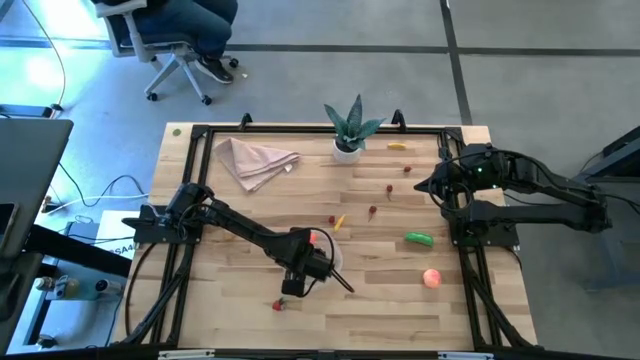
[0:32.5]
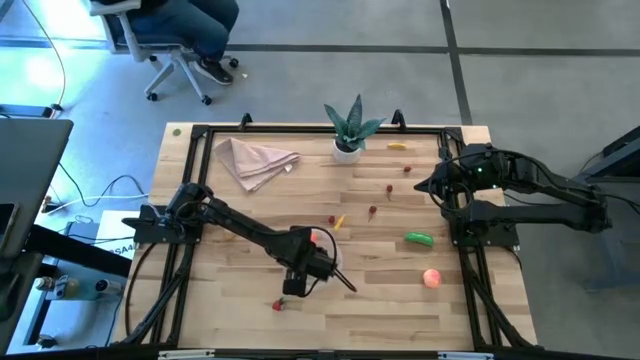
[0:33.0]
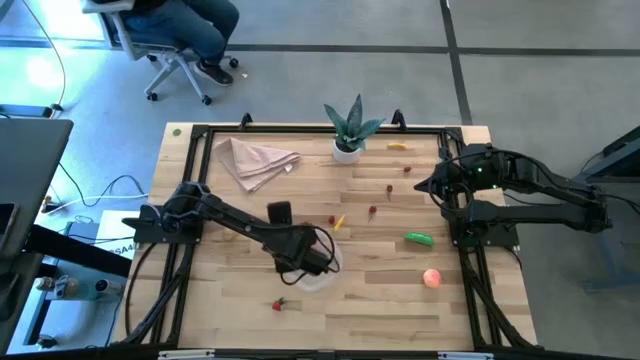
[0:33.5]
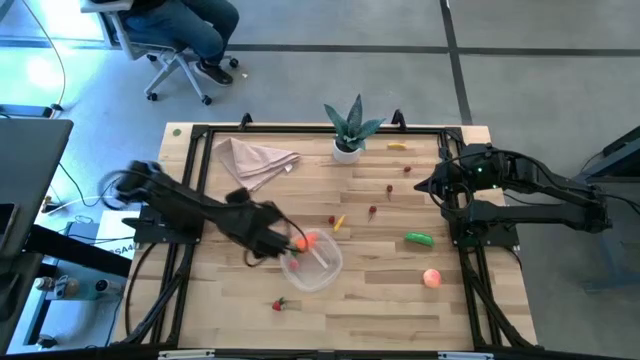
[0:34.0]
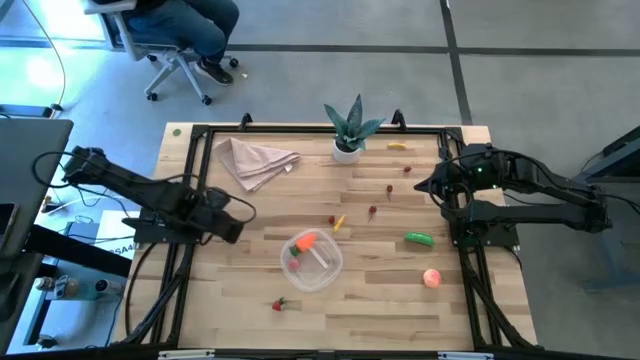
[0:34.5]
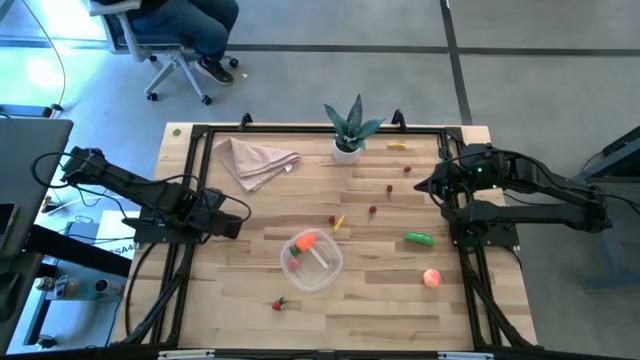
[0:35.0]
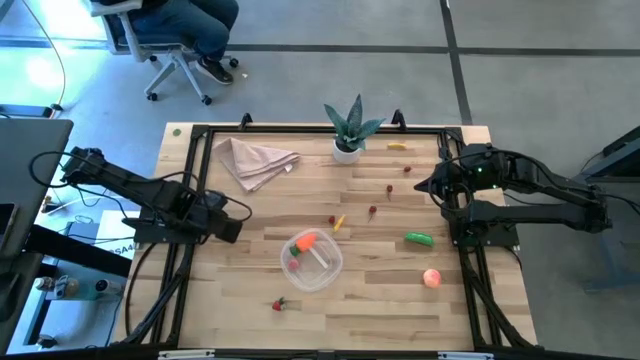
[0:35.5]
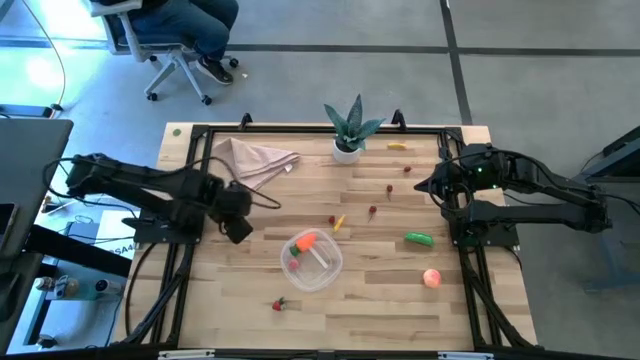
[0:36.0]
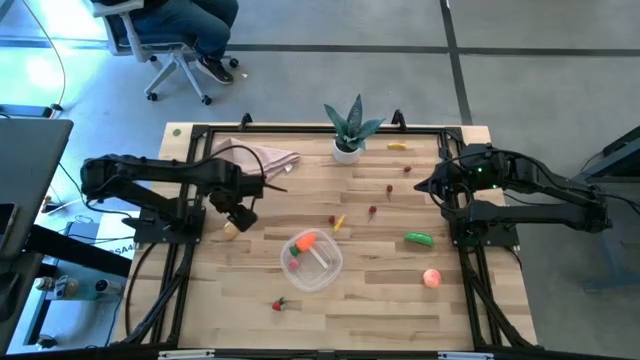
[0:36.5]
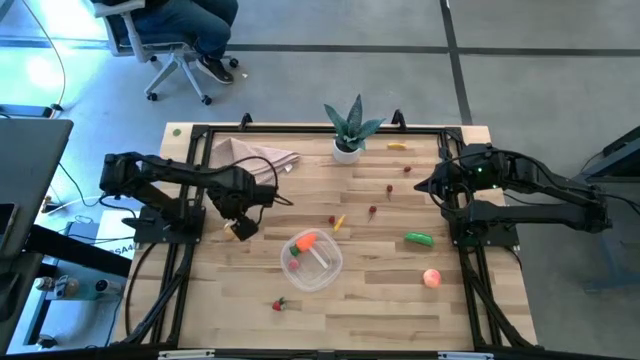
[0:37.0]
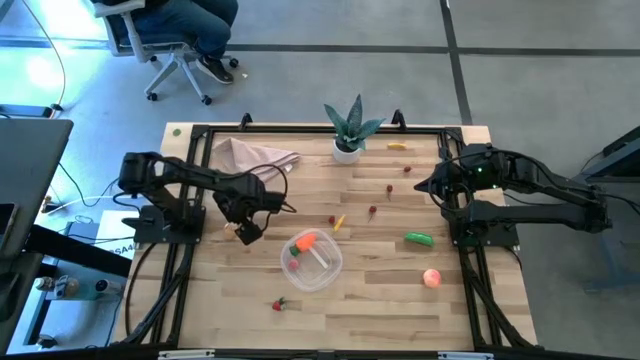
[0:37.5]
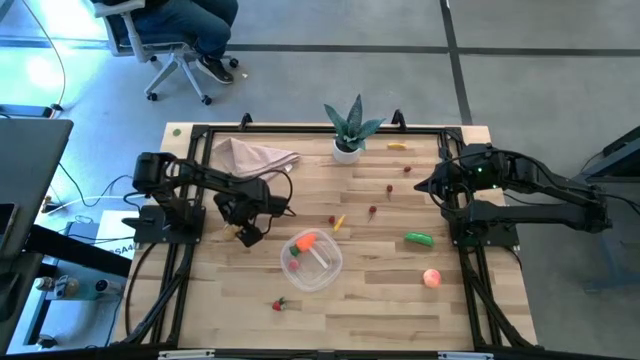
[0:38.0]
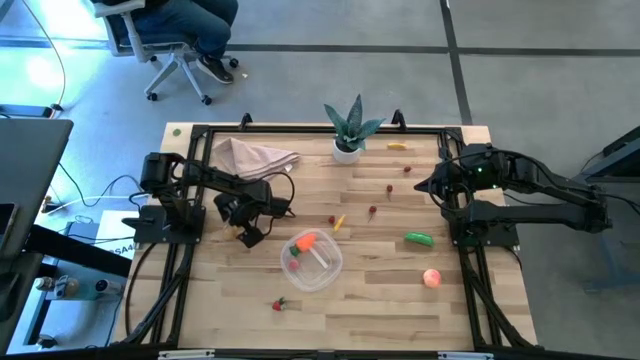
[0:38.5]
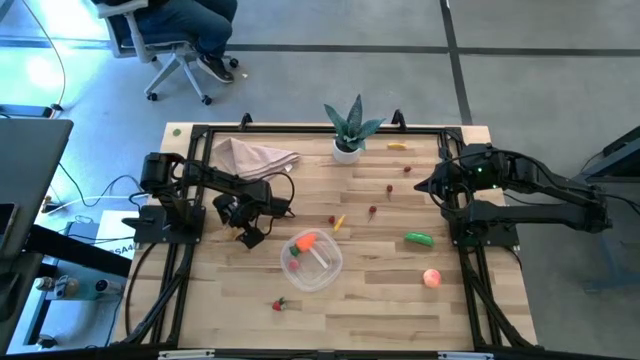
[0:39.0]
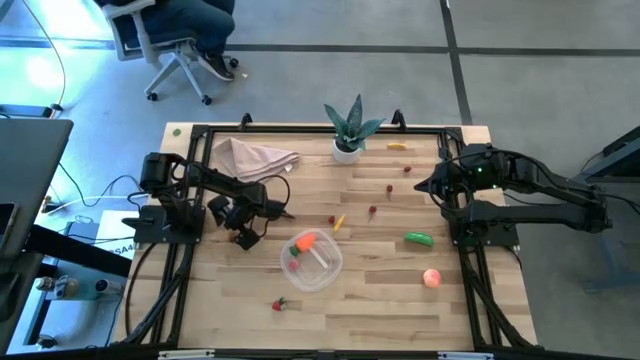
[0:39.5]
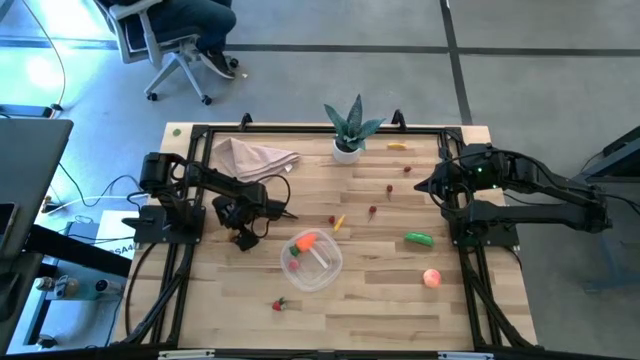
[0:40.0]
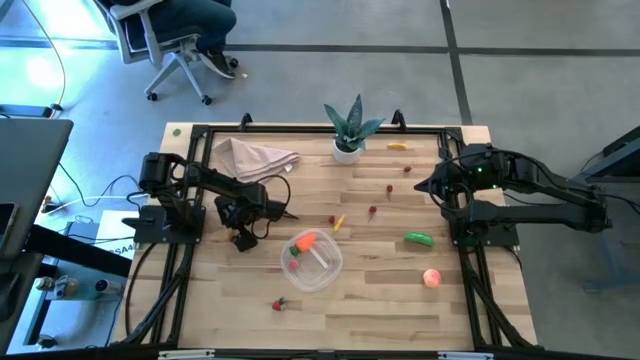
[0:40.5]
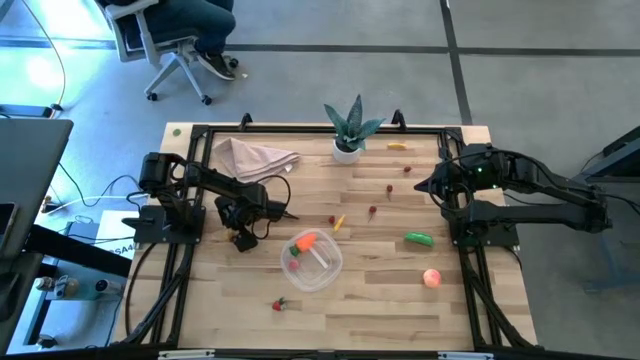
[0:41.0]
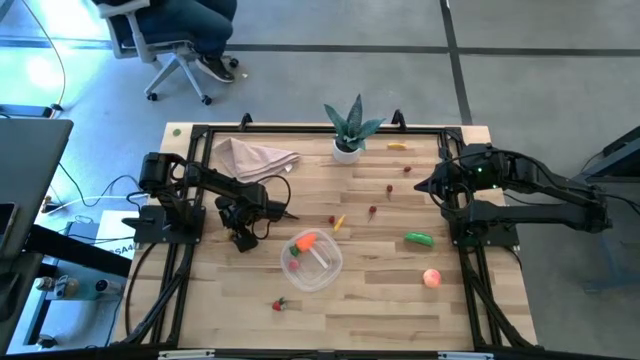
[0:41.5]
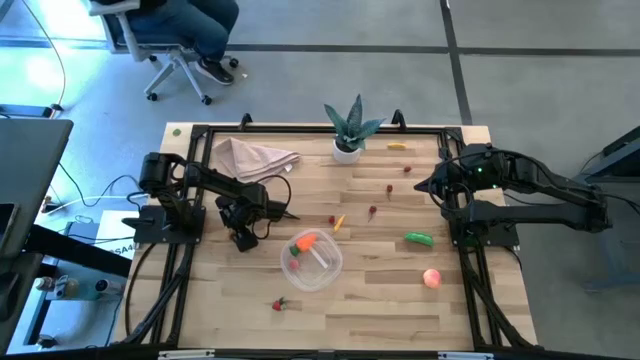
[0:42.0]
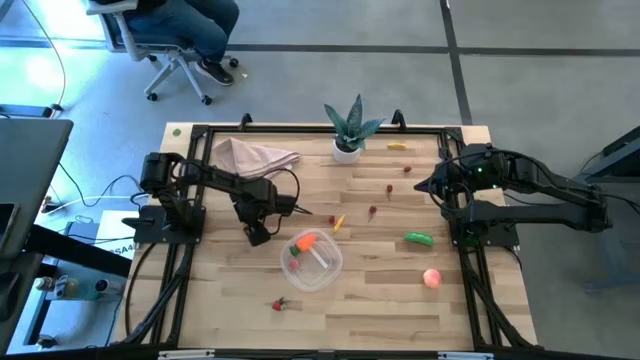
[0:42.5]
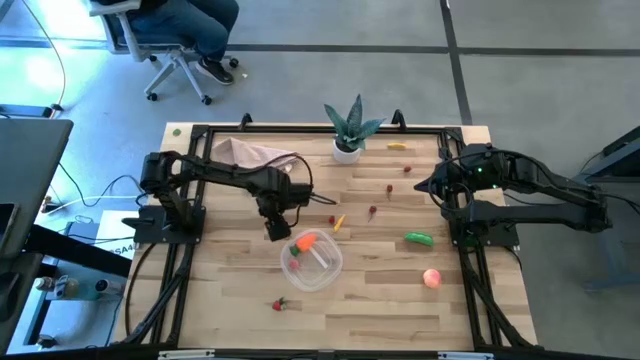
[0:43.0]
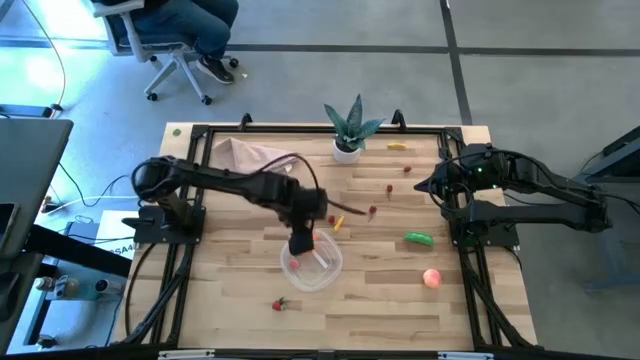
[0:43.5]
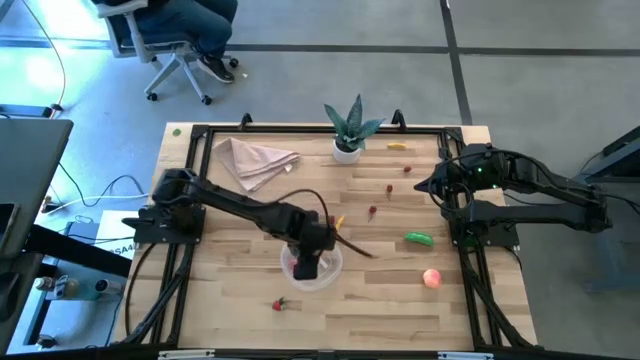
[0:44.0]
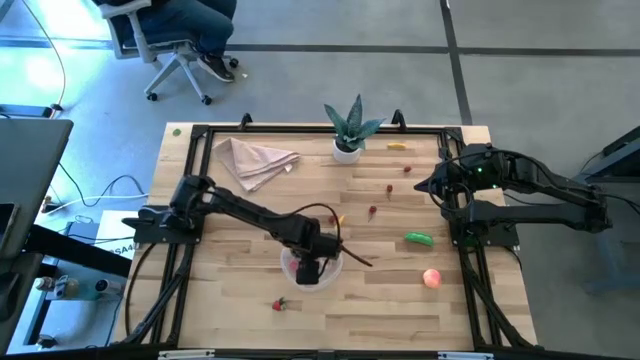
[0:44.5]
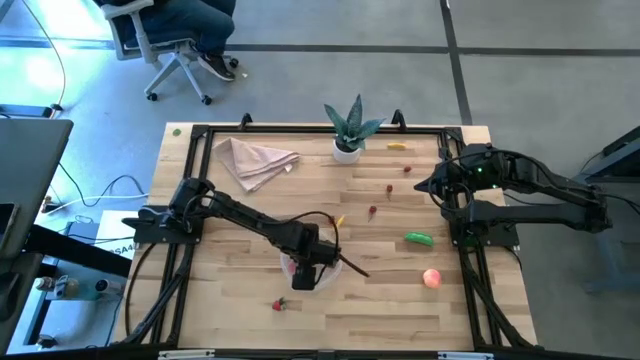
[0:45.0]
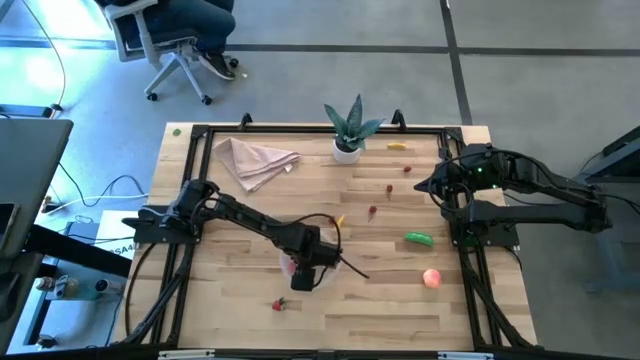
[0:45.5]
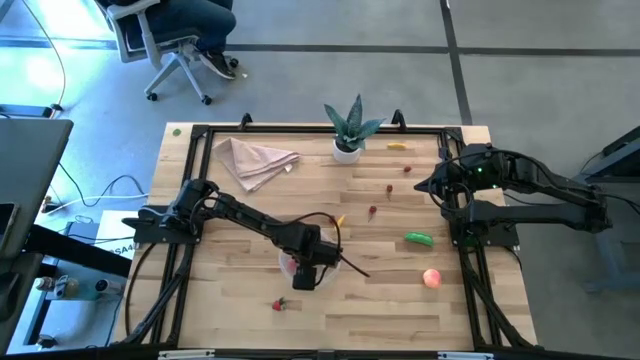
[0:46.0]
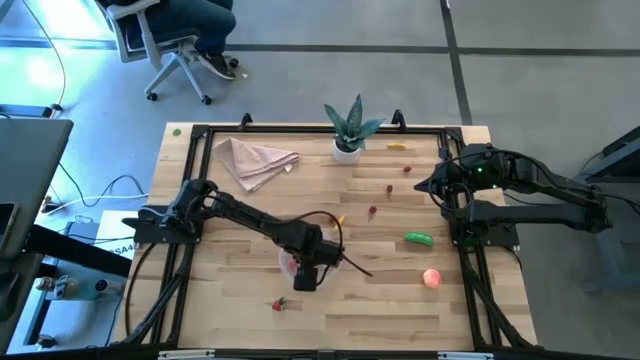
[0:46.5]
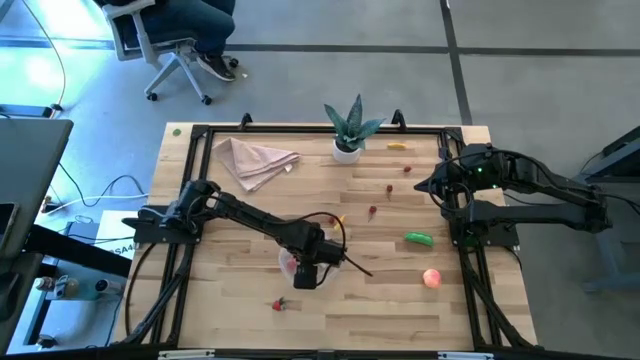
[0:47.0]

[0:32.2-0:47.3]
Task: Pick and placing Produce into tupperware
Put the potato into the transparent container
